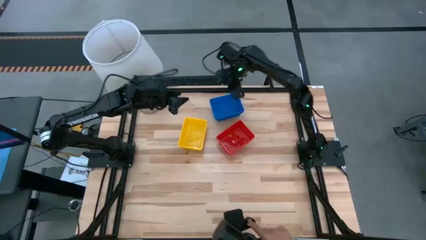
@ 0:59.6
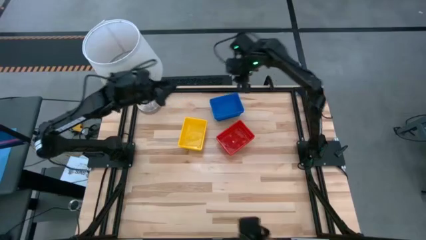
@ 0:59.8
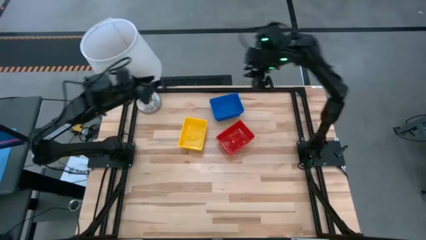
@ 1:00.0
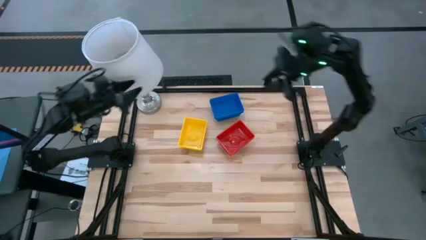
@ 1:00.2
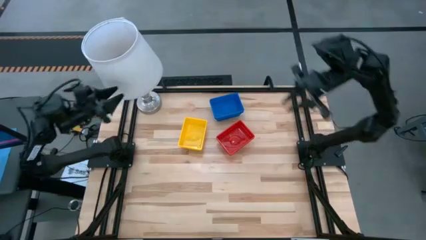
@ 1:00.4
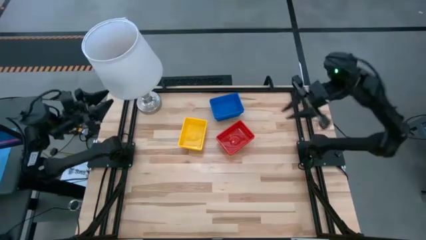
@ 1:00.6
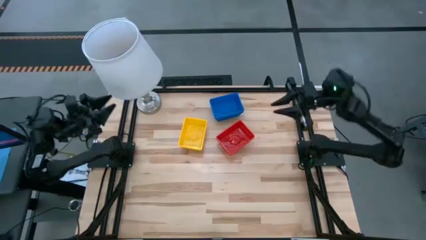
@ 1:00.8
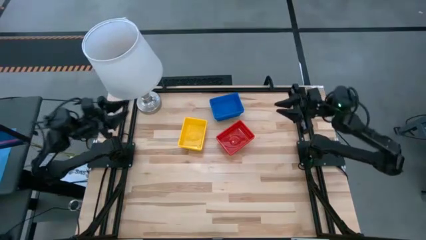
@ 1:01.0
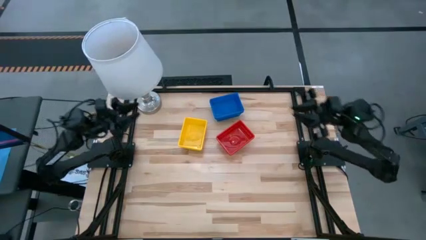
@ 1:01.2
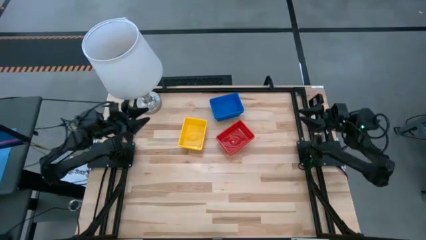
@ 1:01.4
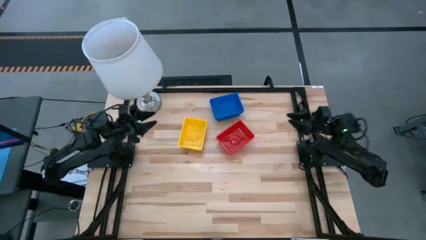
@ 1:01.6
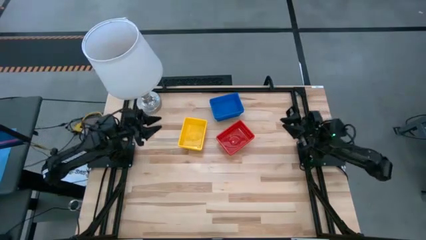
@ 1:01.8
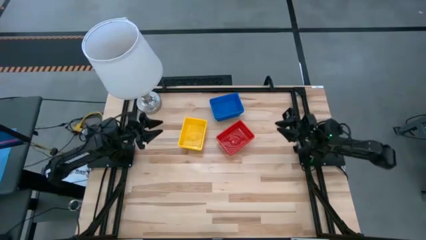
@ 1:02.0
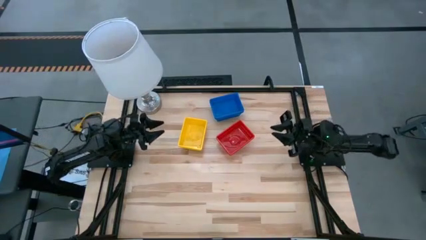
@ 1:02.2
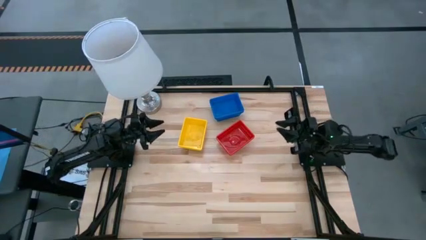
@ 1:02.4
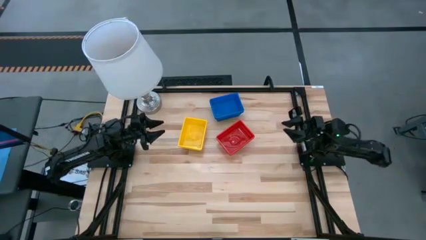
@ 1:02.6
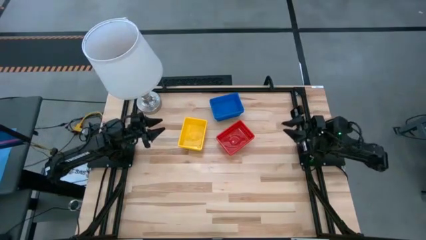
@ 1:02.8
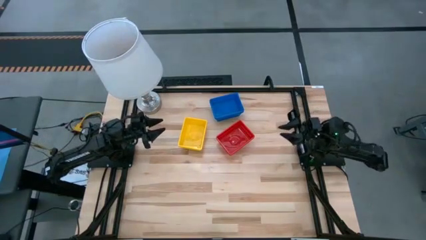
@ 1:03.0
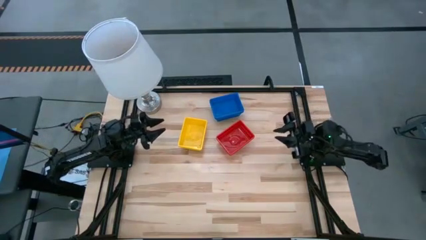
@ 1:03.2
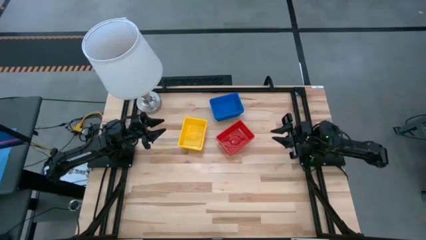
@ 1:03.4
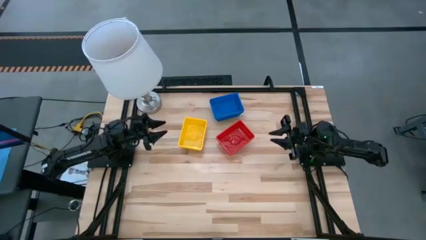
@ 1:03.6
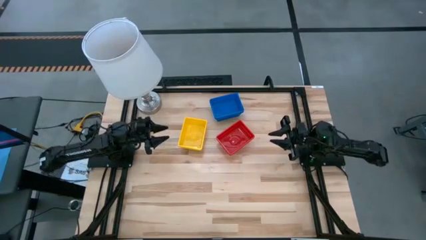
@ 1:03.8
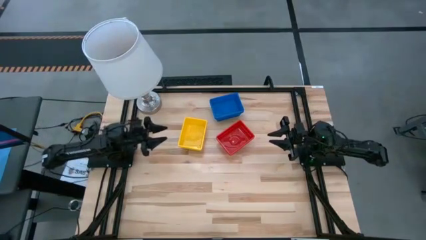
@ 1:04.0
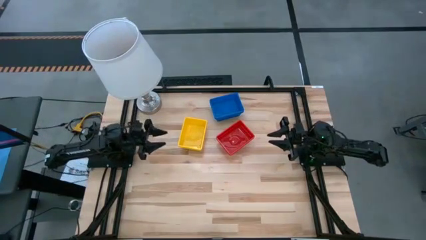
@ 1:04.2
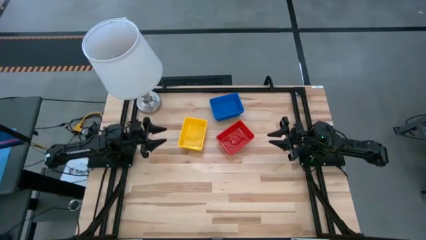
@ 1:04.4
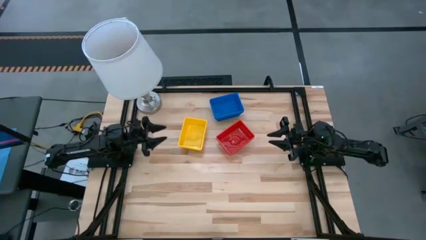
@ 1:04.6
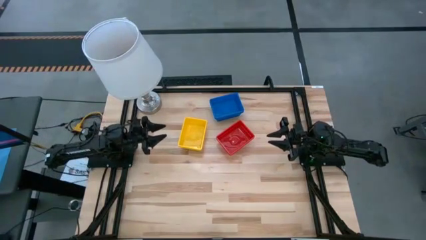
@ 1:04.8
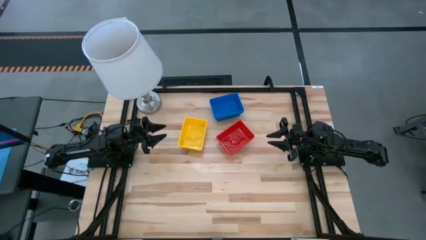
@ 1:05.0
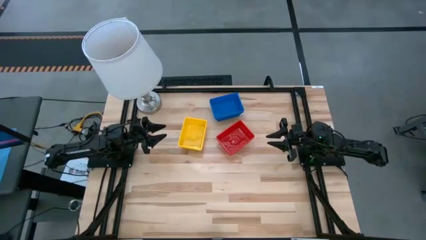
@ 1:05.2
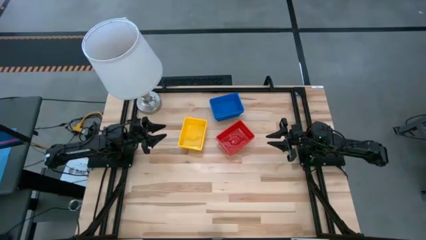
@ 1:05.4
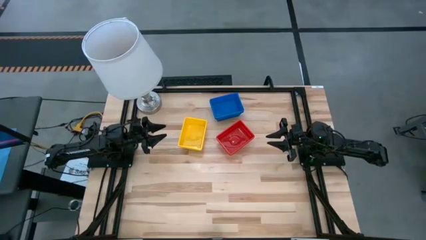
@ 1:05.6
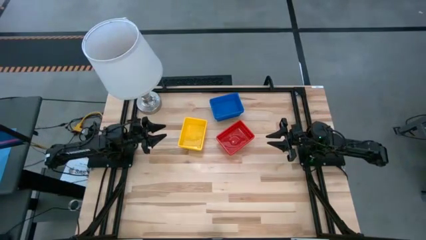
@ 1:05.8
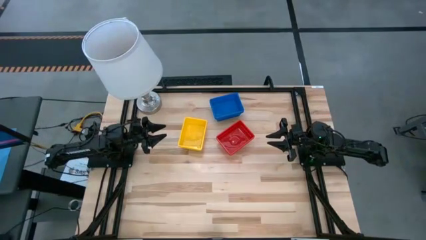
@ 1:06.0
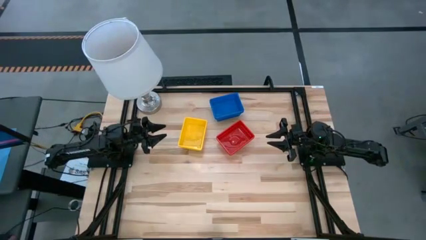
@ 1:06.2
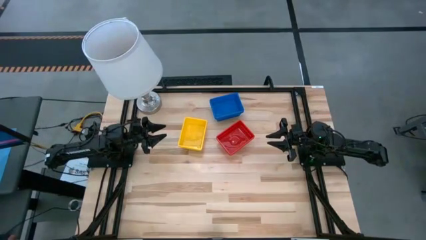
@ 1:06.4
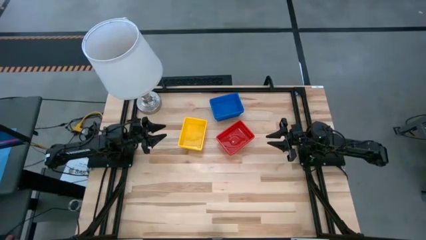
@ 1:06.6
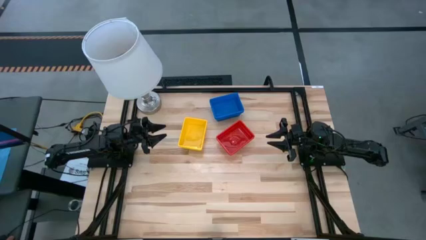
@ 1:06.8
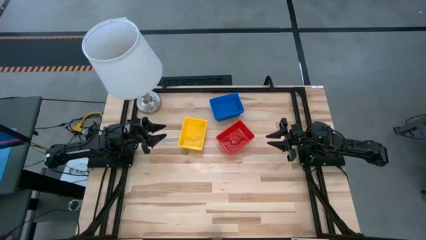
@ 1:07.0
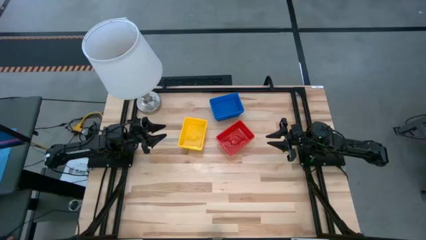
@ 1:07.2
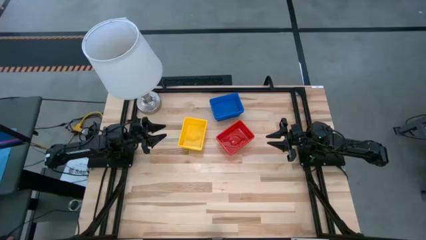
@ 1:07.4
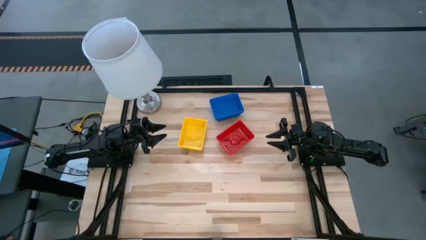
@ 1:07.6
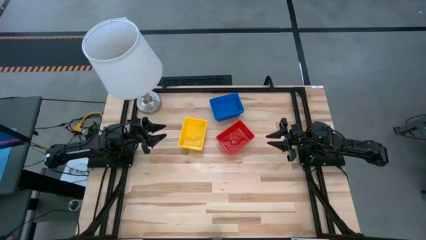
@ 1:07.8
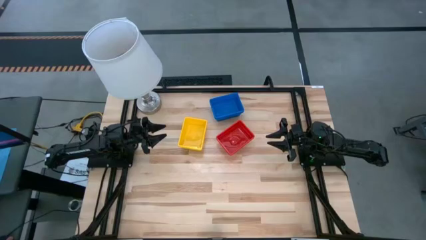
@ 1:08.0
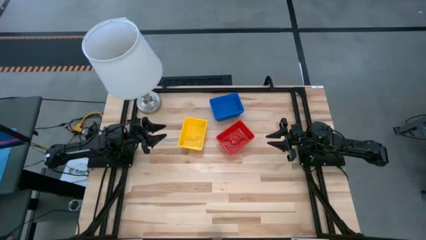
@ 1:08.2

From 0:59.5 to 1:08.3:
Return to home position

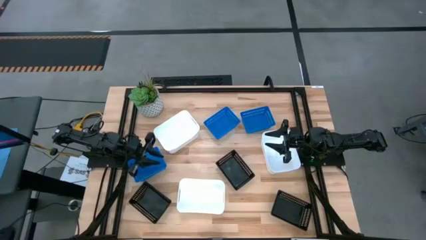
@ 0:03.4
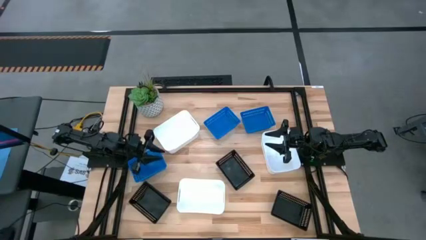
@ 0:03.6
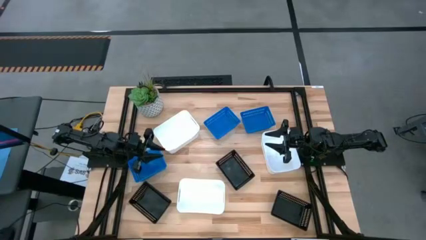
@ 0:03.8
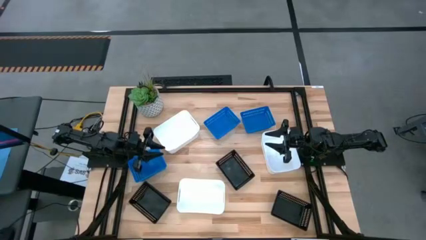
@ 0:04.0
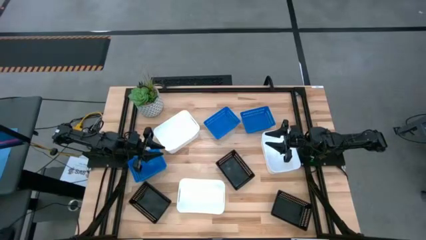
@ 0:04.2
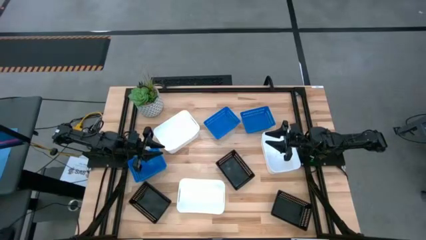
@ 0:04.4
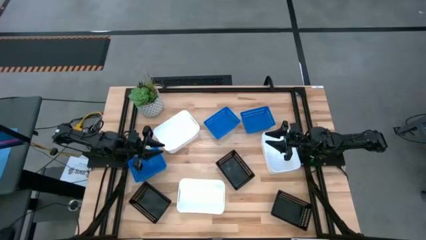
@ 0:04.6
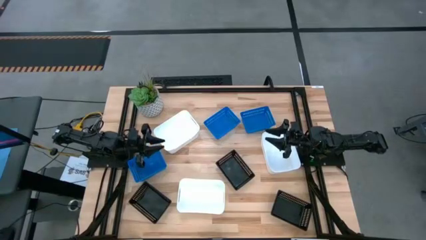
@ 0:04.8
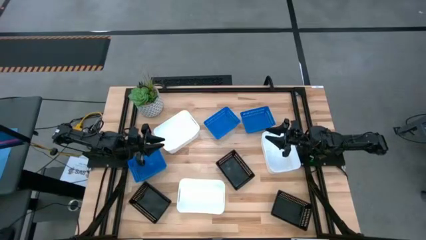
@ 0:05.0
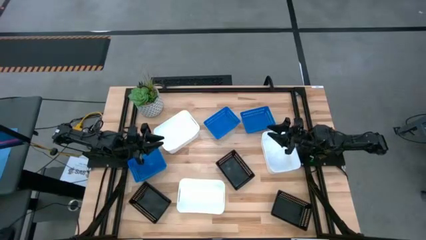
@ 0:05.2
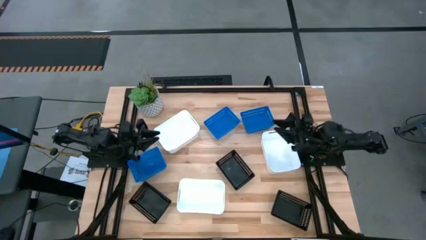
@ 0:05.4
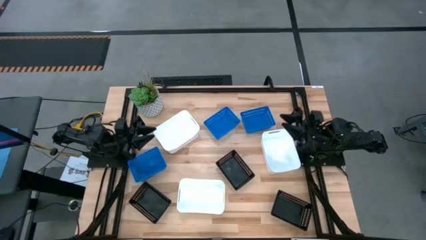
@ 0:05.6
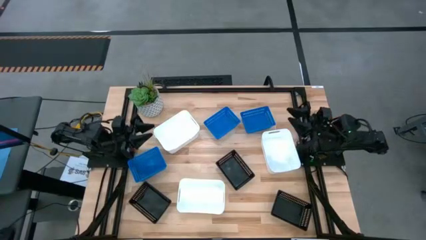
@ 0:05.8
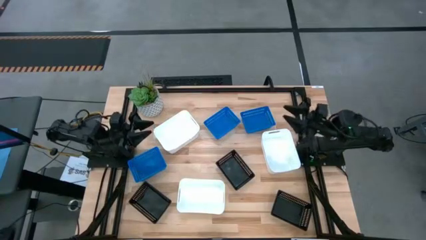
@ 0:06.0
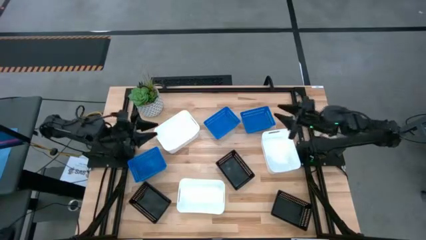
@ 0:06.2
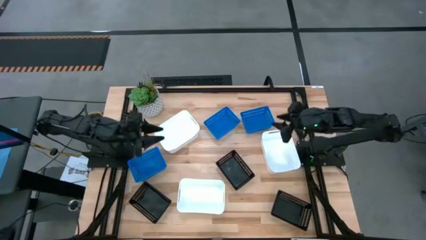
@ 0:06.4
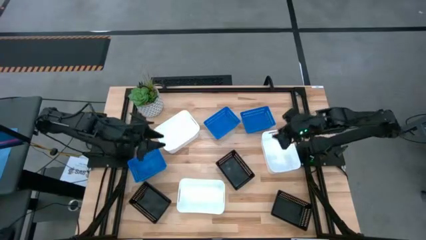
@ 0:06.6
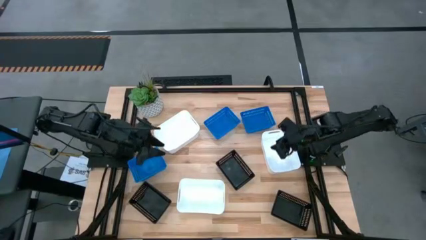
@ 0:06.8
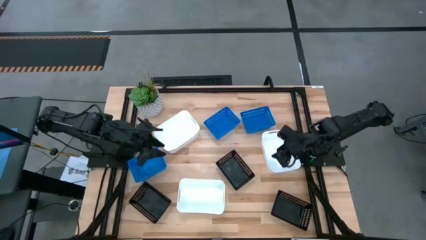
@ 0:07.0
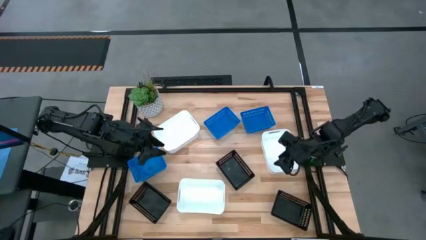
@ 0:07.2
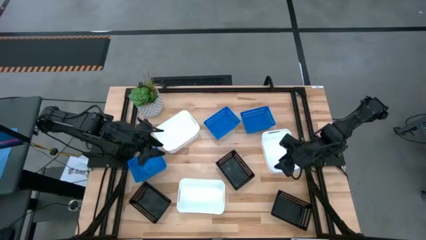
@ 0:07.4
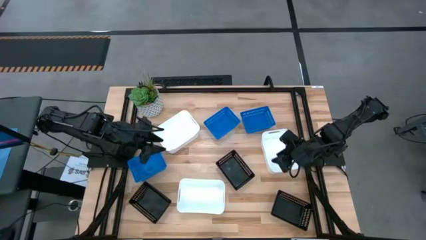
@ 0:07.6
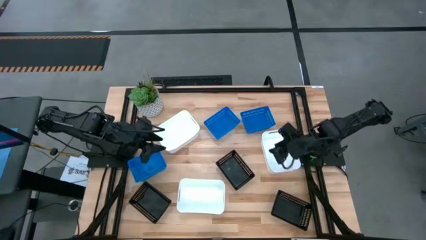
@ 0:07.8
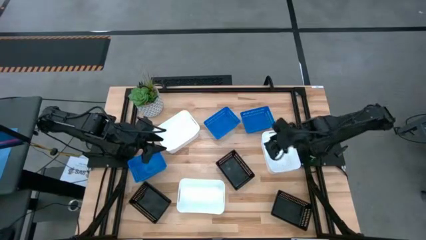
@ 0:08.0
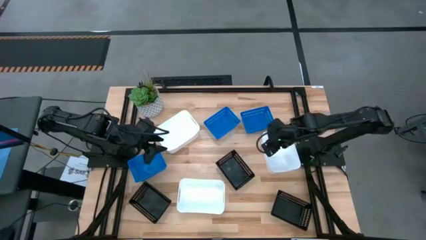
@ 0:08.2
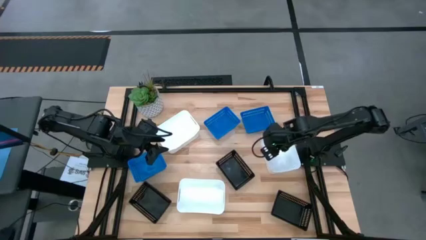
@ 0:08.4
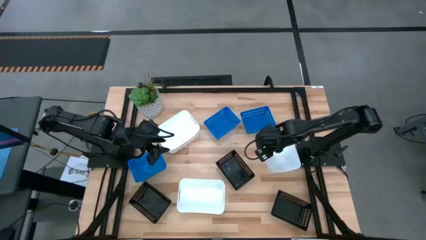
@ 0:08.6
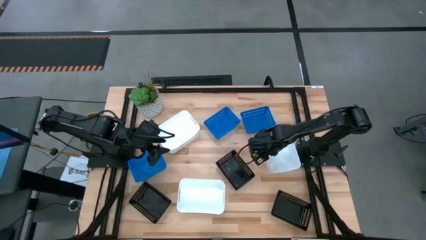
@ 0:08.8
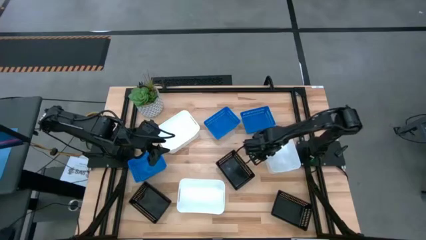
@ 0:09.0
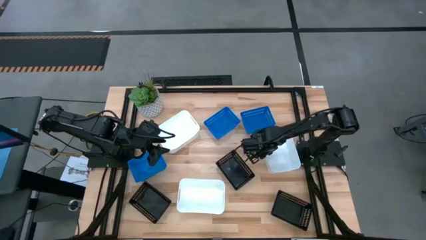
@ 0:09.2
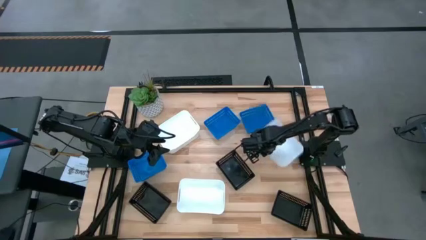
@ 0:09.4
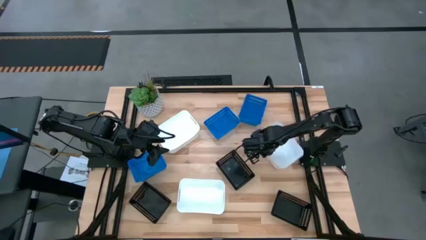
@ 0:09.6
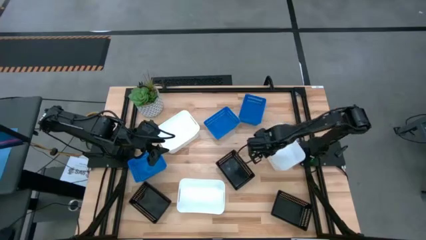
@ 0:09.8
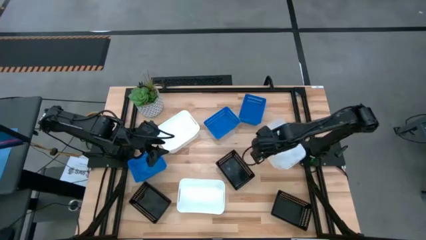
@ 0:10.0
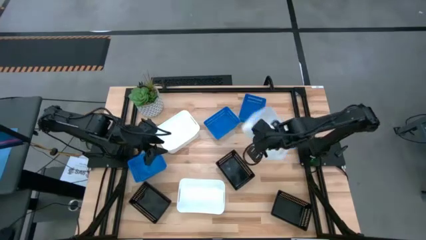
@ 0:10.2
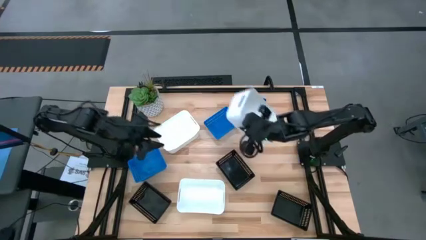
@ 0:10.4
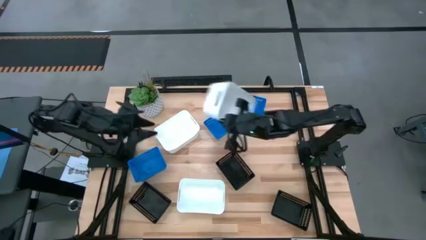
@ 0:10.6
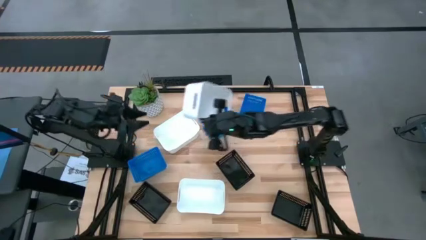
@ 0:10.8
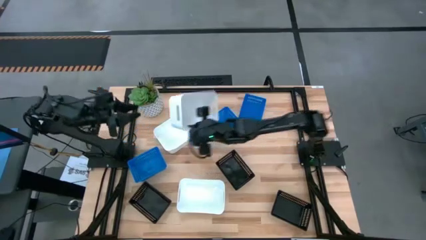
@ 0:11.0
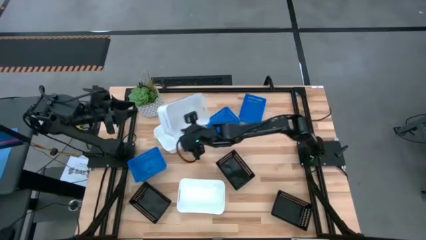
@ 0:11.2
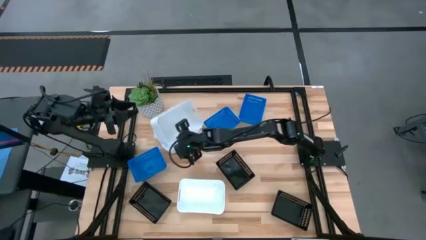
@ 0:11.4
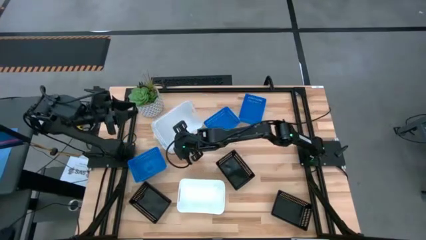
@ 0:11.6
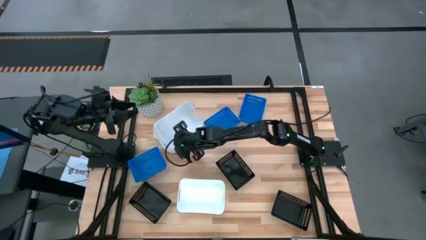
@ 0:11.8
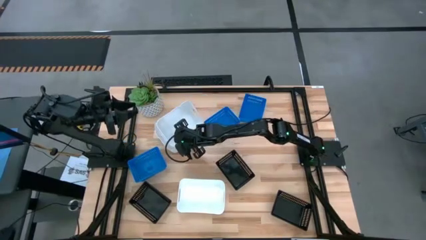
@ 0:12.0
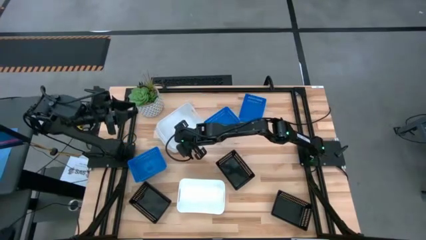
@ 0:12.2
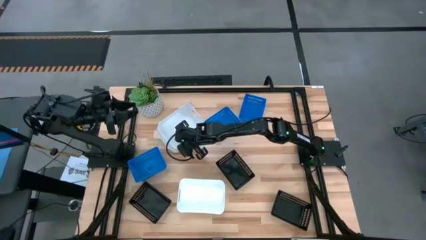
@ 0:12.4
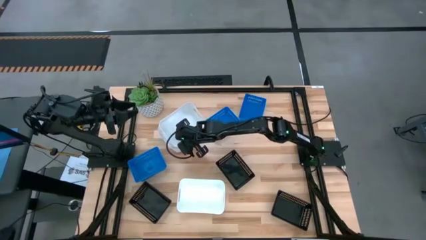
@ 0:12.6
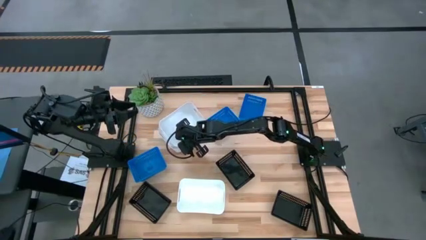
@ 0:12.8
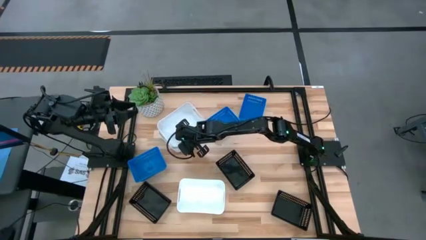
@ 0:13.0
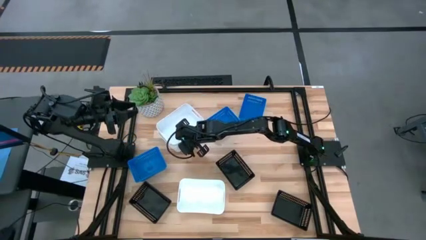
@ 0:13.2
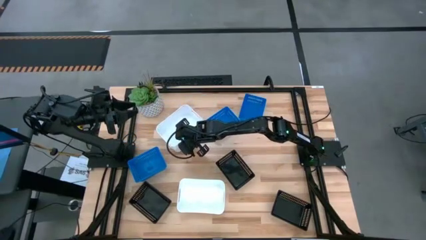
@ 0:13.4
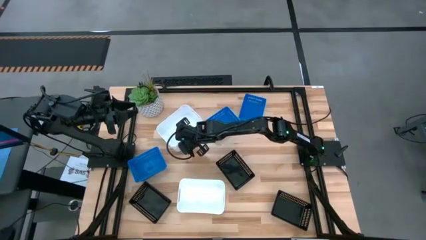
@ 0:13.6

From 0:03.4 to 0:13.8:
Stack the middle right white bin on the top white bin
